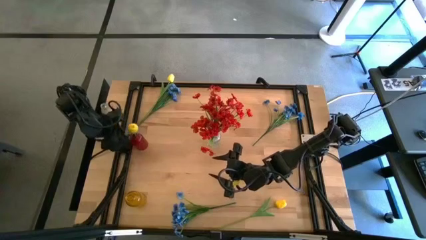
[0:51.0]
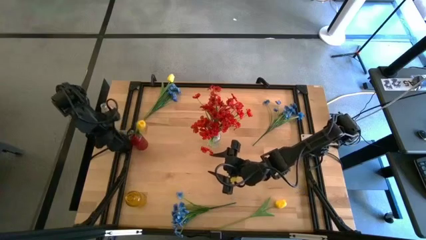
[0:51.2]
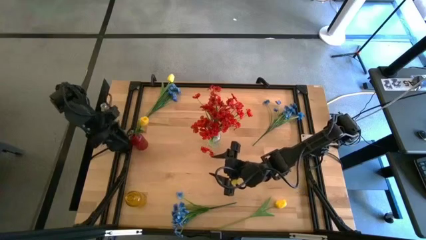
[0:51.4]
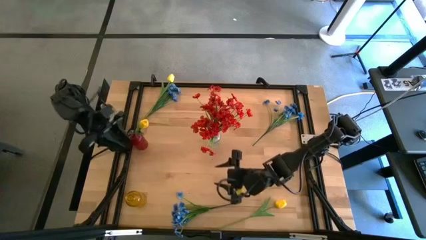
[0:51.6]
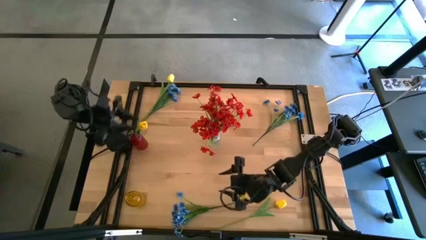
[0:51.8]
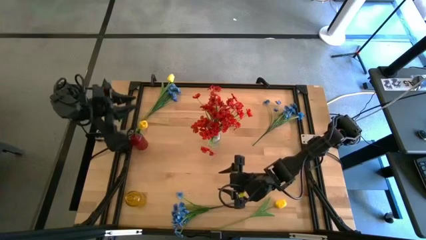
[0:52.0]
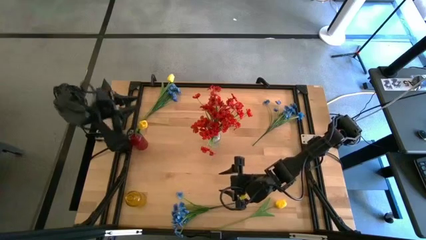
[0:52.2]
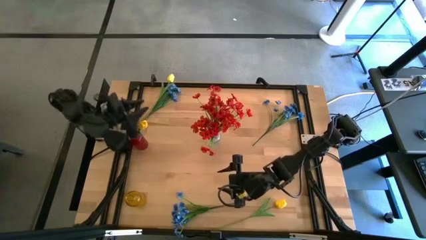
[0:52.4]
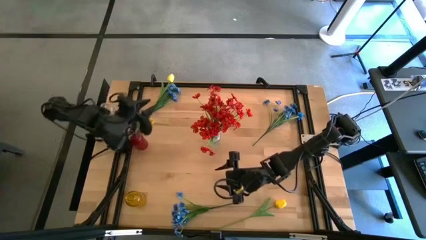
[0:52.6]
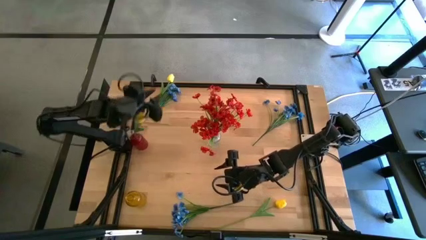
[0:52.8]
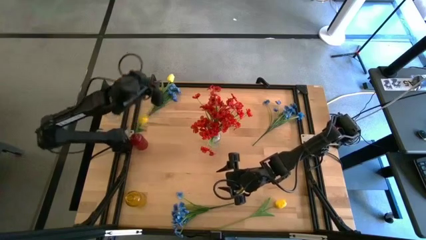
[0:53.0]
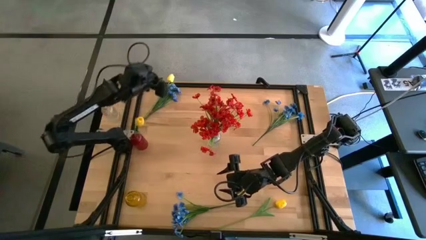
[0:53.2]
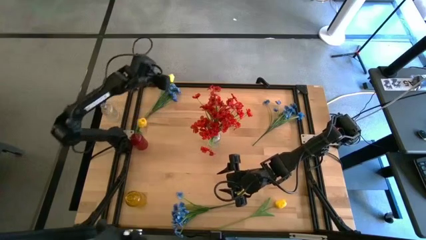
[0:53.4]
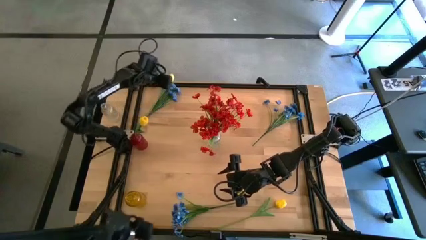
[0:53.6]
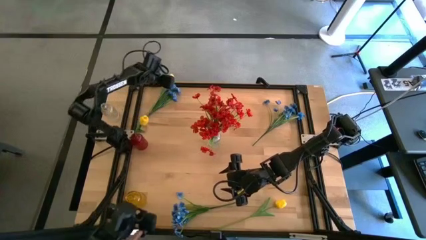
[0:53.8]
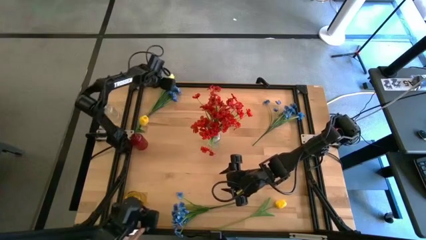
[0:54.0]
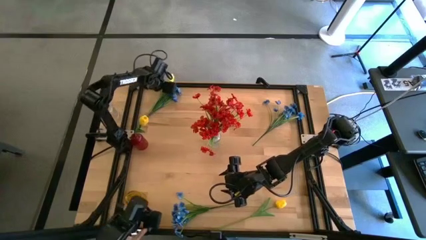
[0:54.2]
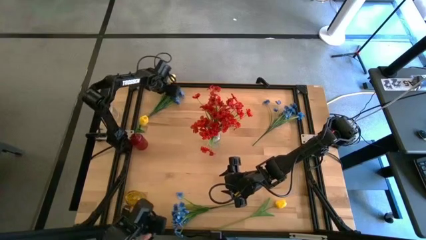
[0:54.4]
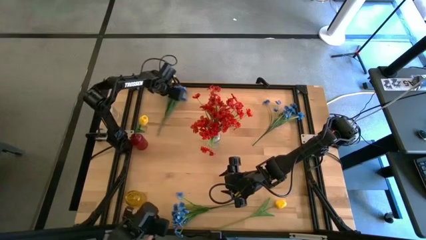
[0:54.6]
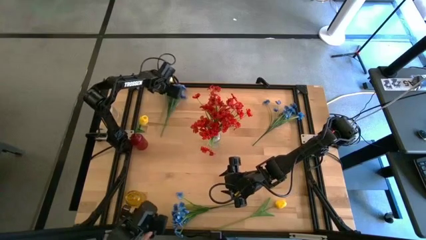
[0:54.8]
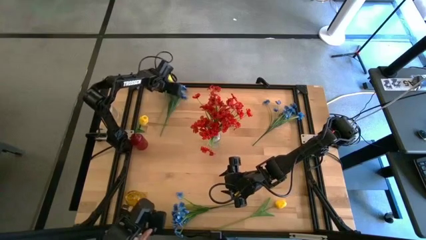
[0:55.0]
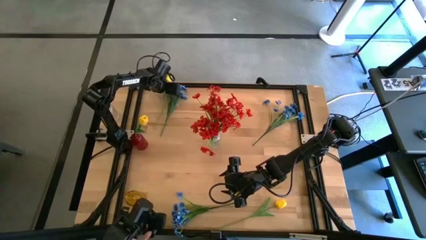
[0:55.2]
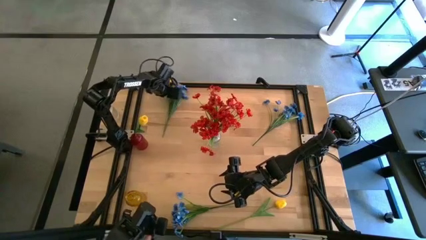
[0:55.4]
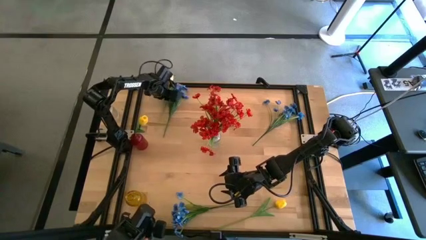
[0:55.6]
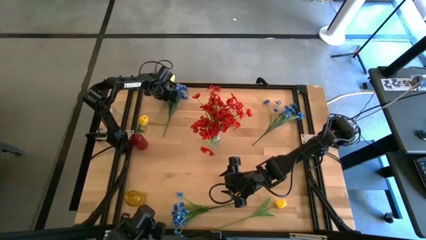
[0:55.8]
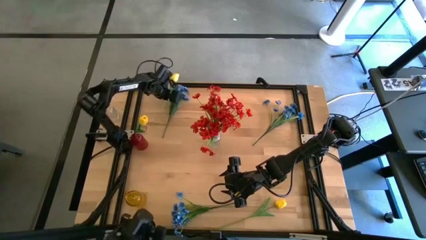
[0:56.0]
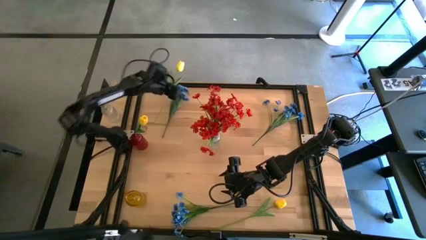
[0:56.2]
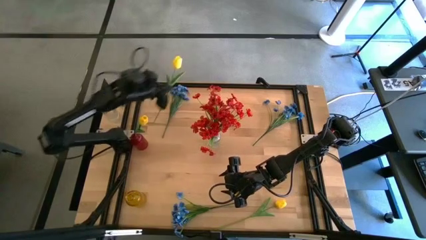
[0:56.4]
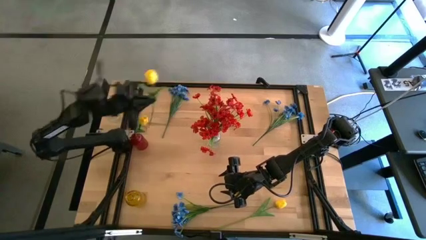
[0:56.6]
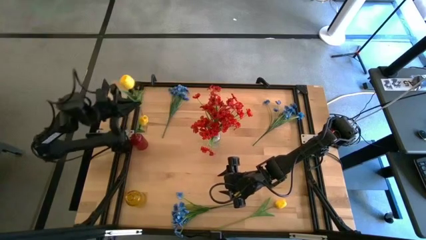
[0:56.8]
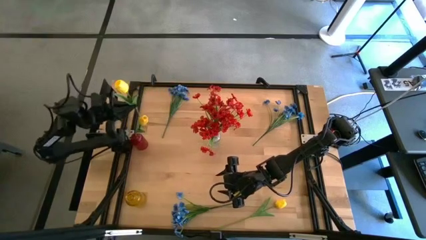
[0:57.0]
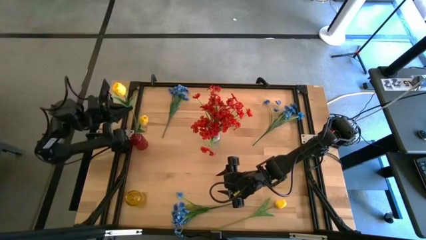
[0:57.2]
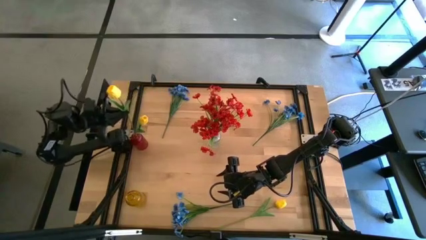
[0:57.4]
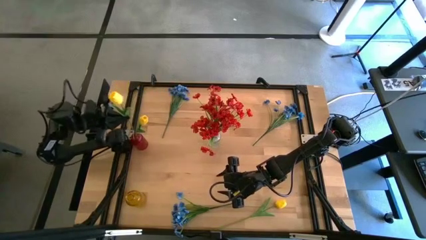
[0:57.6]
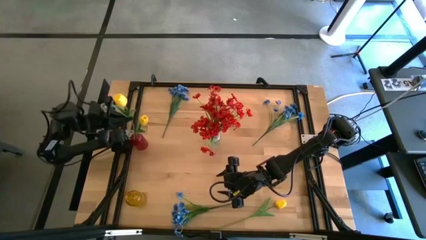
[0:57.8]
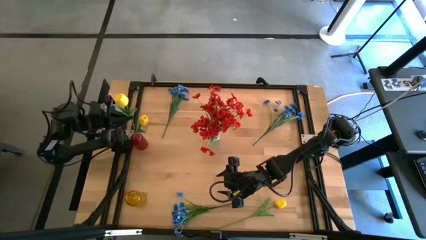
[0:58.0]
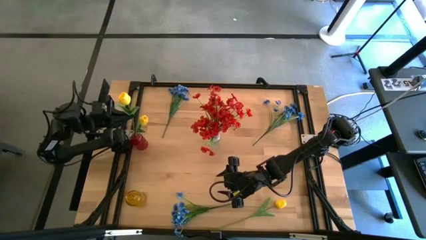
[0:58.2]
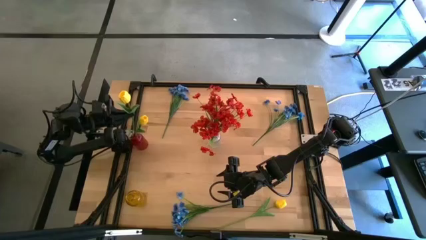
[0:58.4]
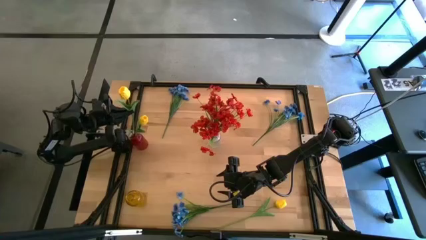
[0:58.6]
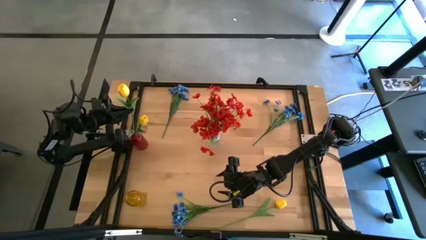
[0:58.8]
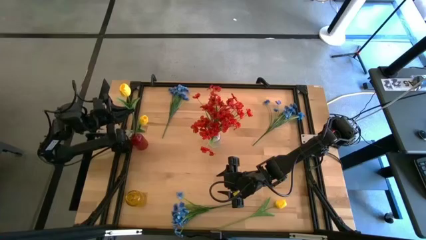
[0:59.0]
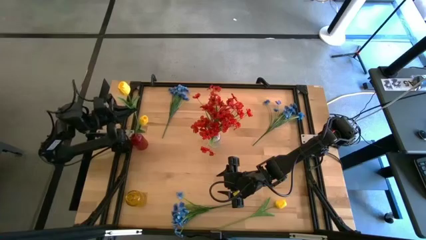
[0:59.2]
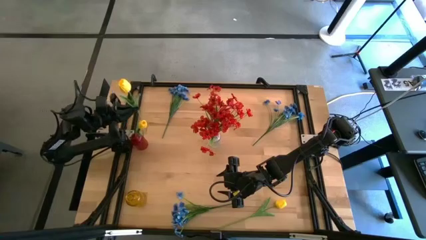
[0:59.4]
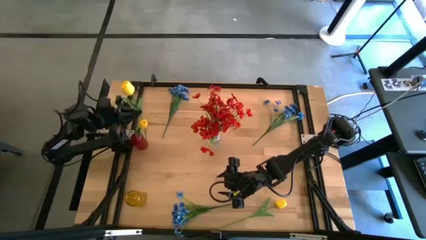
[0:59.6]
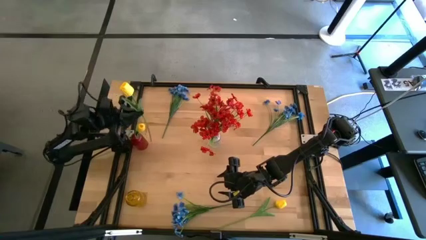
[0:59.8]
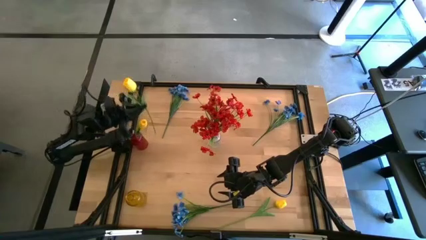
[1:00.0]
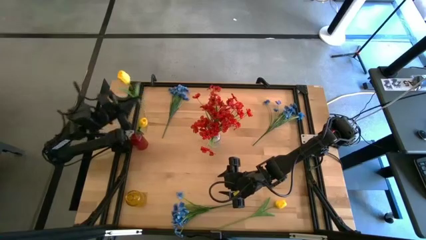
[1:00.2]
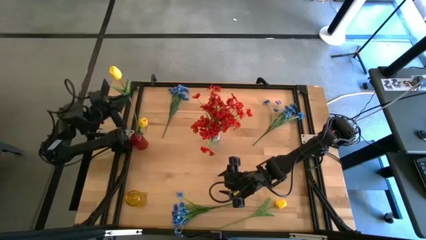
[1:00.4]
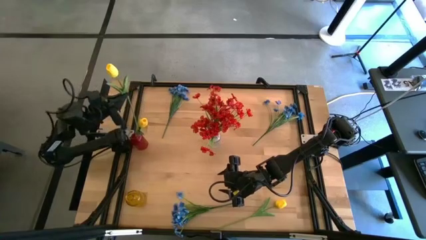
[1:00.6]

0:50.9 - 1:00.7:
Task: Sort flowers into vase by color
Put the top yellow flower into the red vase

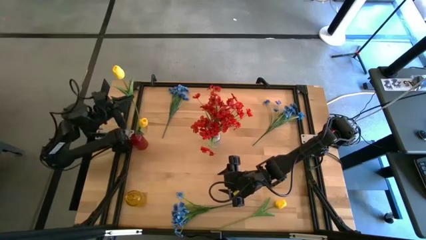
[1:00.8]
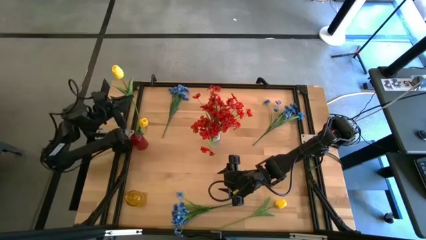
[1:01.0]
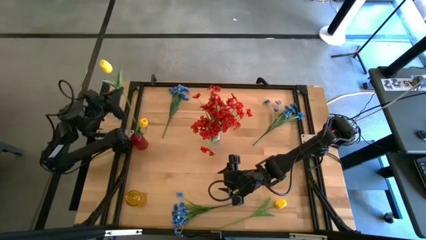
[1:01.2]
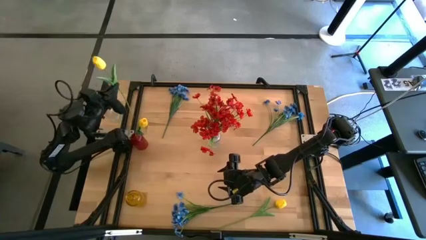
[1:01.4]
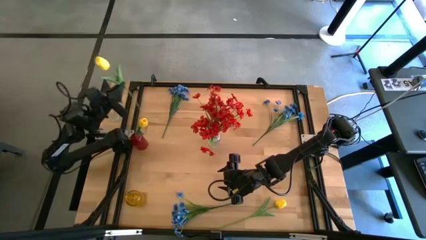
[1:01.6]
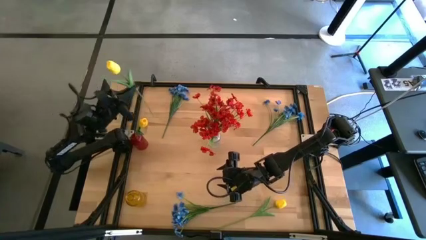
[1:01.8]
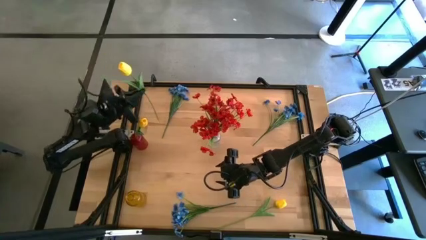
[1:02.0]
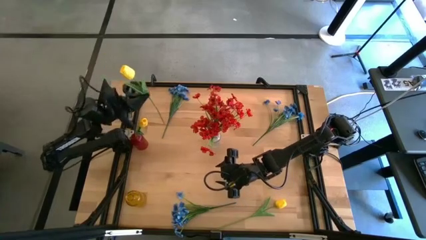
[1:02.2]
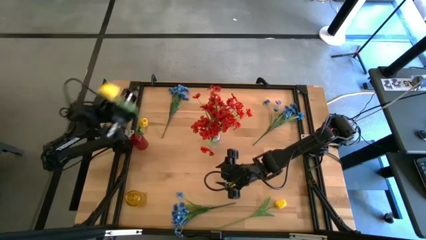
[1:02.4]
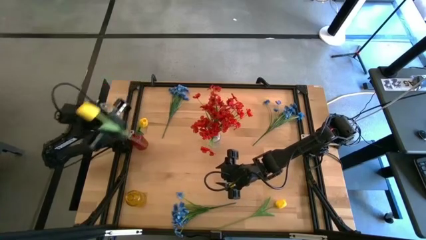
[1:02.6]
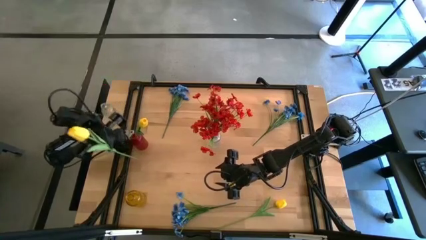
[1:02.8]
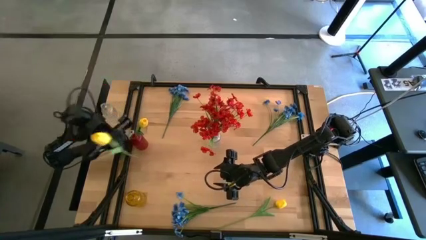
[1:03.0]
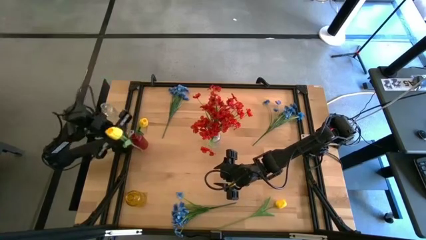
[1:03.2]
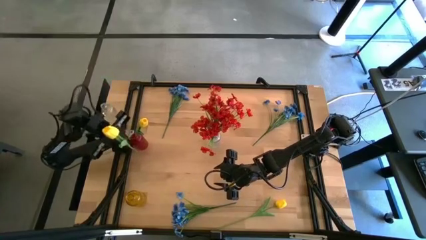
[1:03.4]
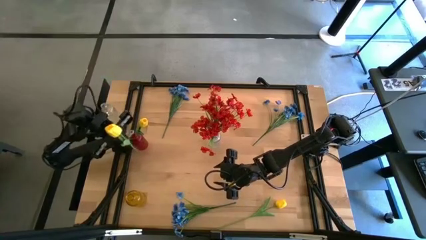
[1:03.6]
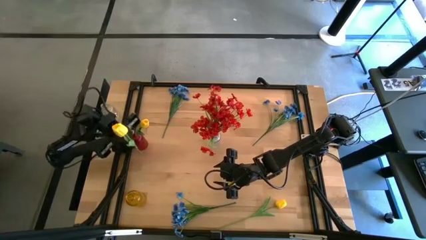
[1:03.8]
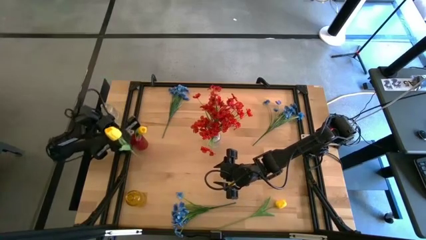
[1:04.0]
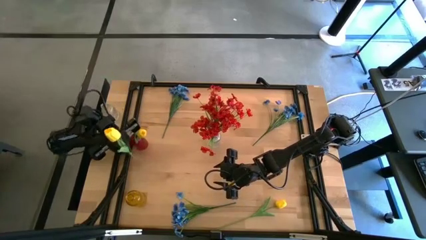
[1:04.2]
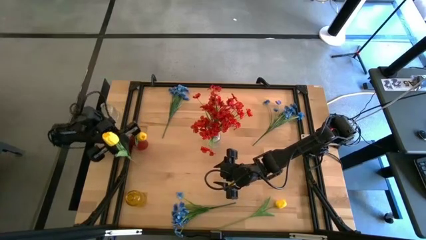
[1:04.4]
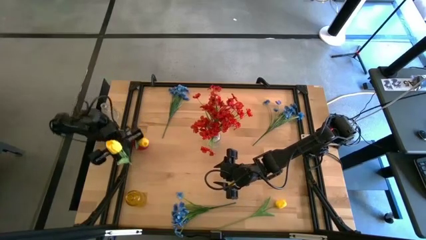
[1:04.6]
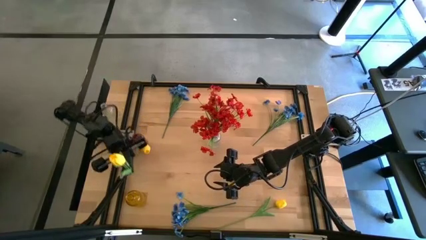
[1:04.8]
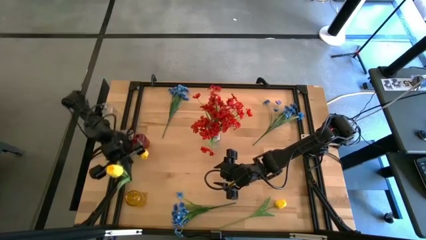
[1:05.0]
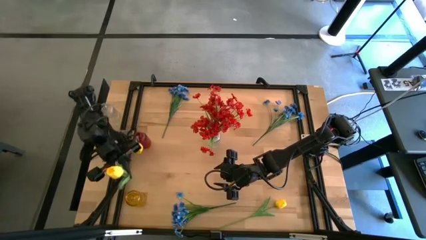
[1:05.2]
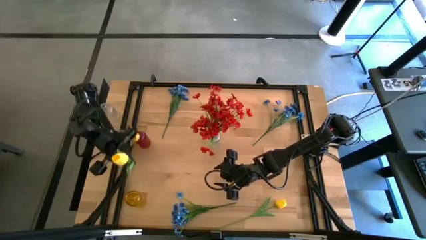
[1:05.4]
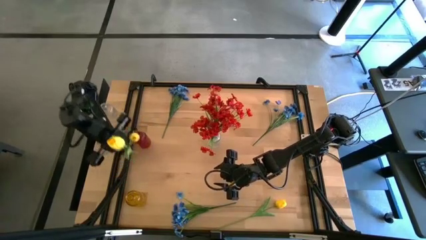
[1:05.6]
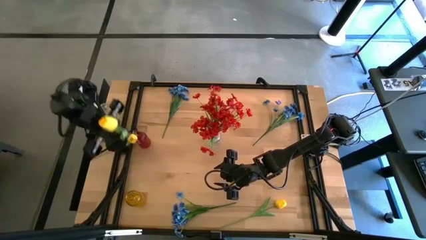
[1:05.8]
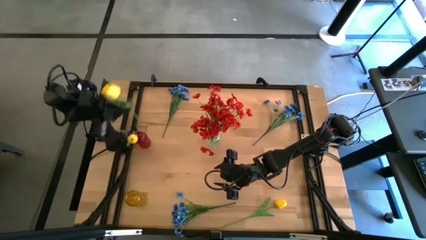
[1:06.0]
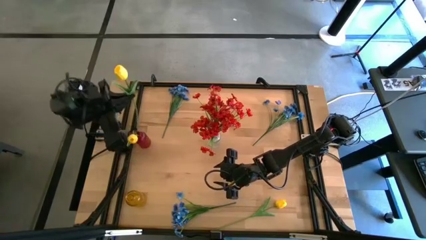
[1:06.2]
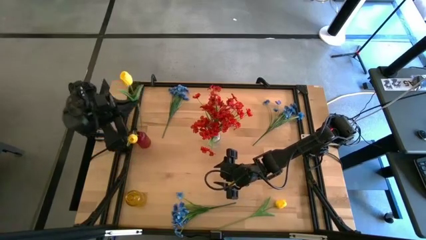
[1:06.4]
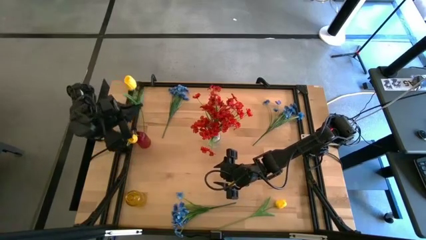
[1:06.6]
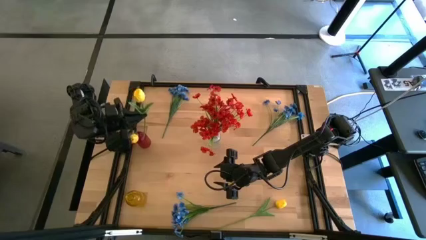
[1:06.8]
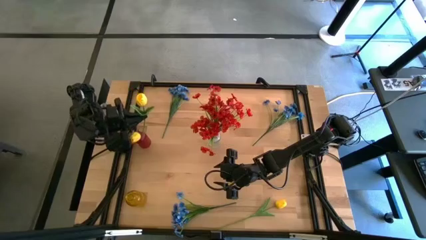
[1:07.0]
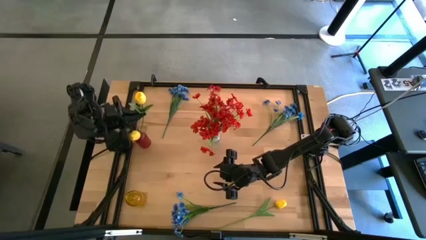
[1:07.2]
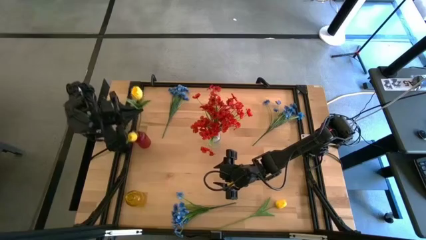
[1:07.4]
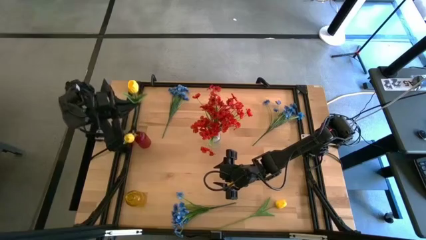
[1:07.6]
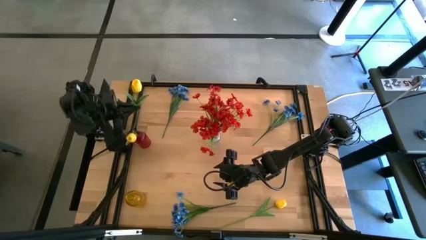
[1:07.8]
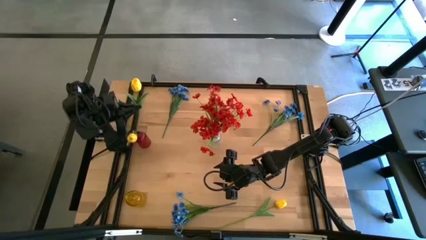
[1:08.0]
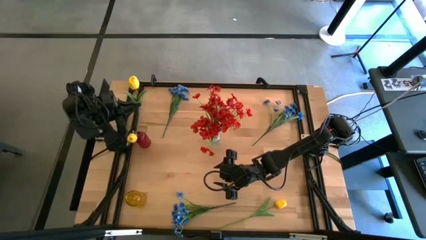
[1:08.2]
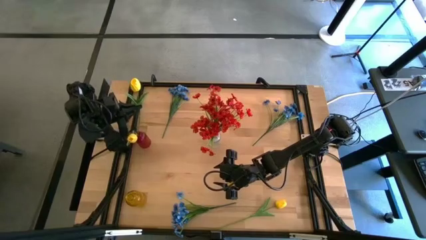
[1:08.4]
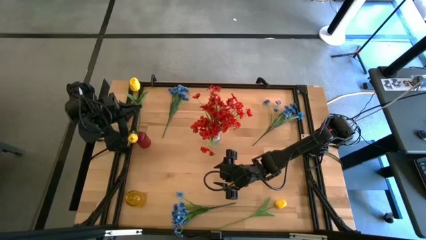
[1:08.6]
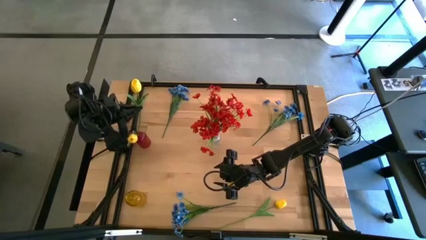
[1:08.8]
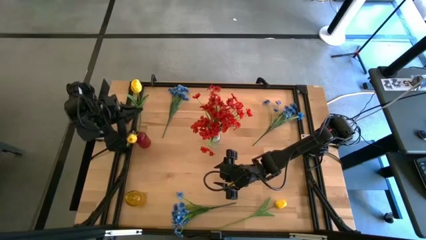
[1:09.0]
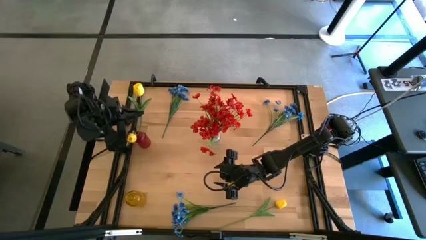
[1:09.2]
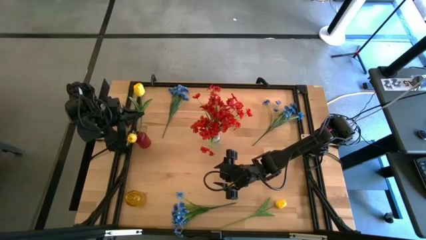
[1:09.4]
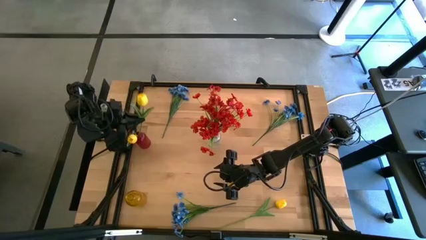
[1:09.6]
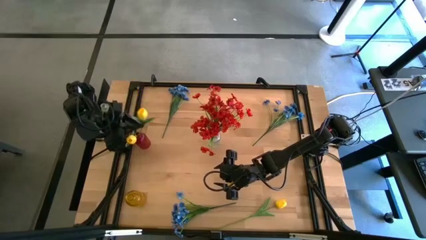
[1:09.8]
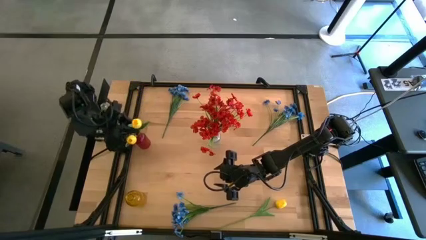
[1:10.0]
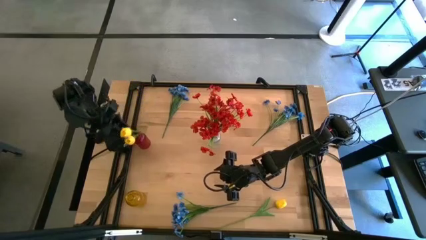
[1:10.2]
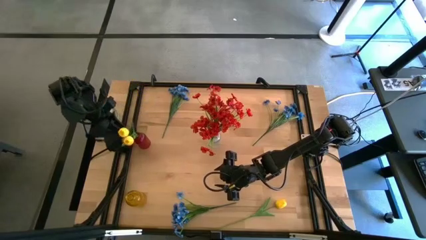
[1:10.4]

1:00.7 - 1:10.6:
Put the top yellow flower into the red vase
